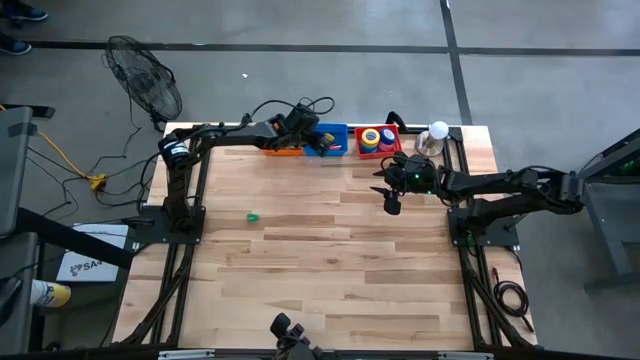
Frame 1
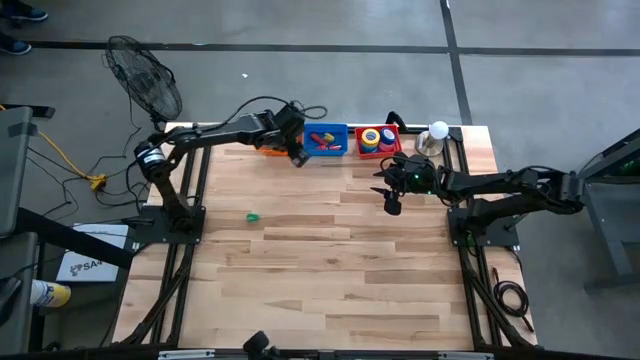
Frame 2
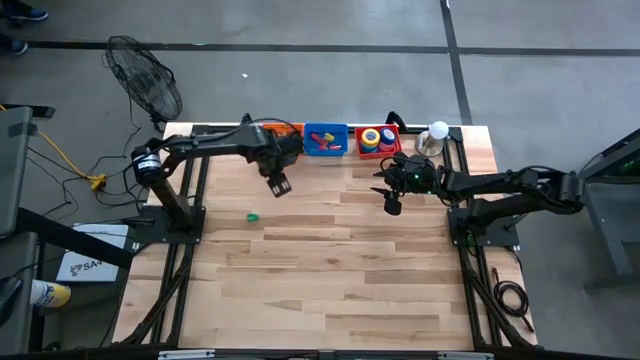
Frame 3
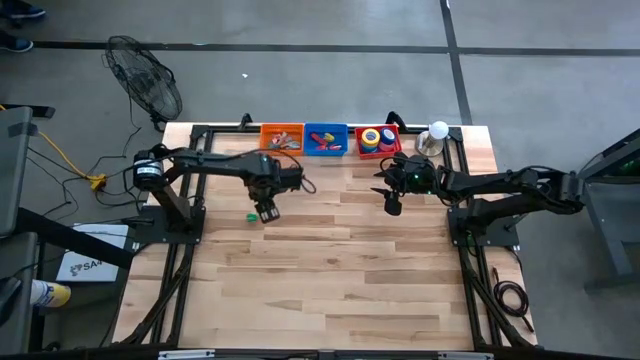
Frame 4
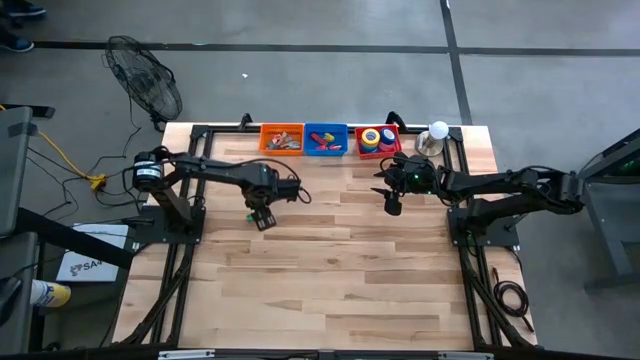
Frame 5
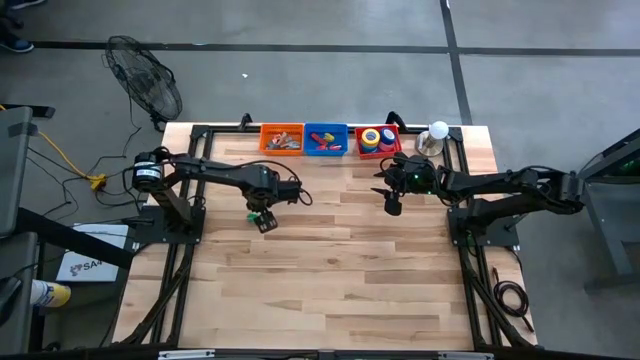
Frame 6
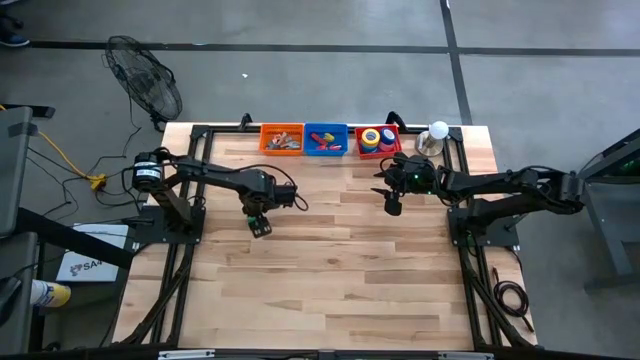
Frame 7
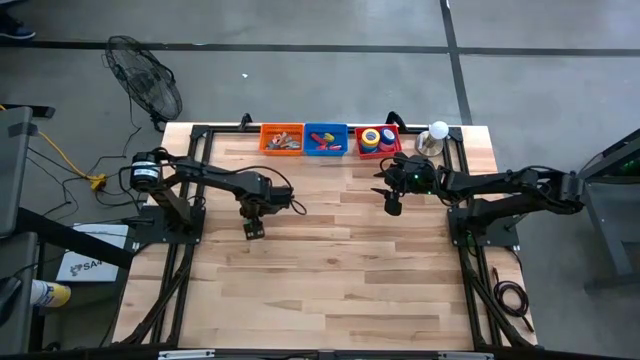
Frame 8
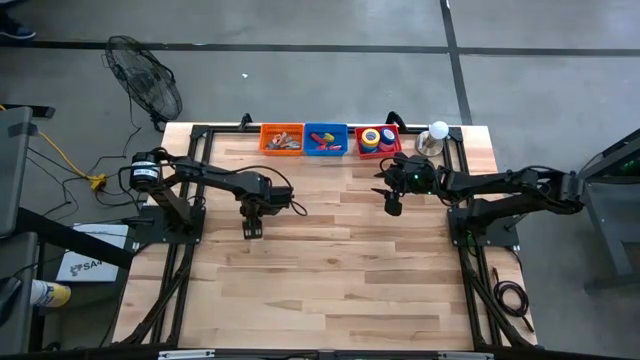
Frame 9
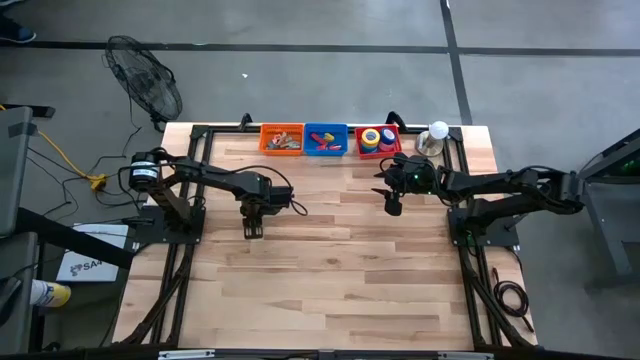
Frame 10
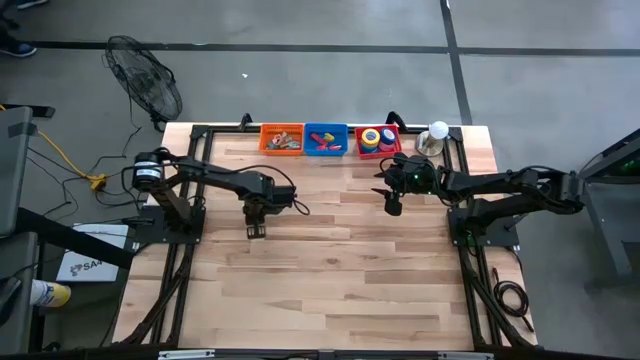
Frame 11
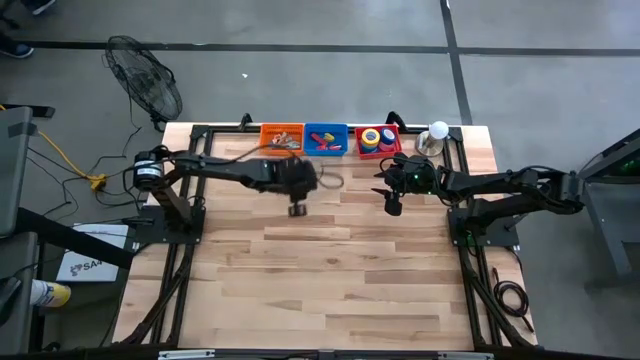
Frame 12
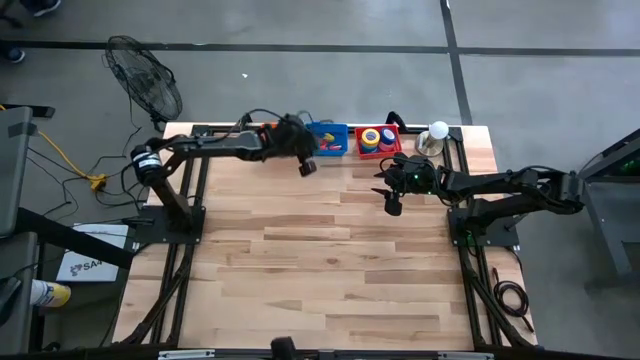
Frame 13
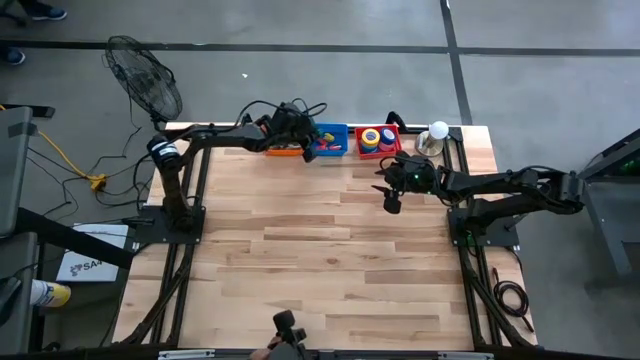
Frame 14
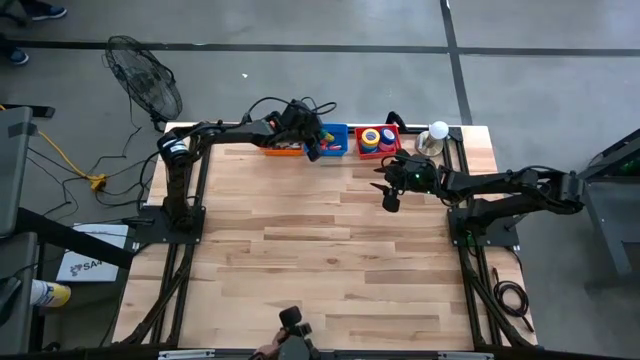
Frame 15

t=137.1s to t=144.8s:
Task: Pick and place Stapler, Stapler remover, tape
Put the green stapler into the blue bin

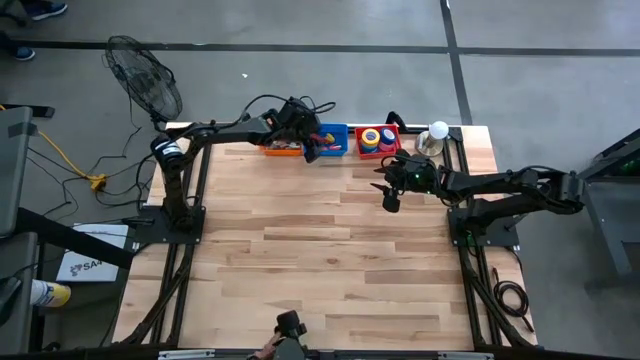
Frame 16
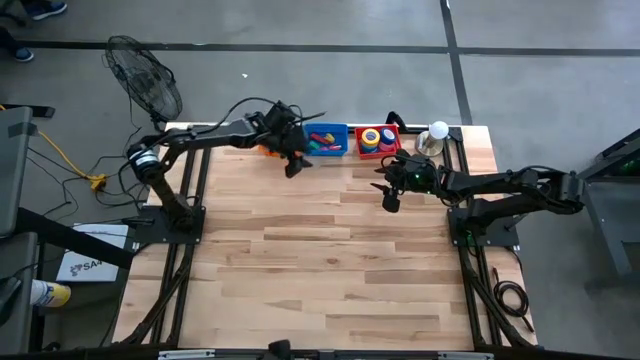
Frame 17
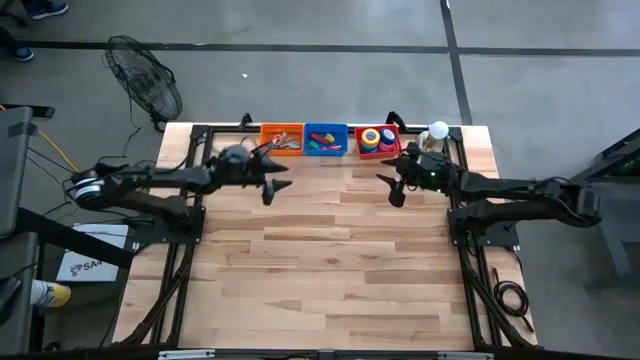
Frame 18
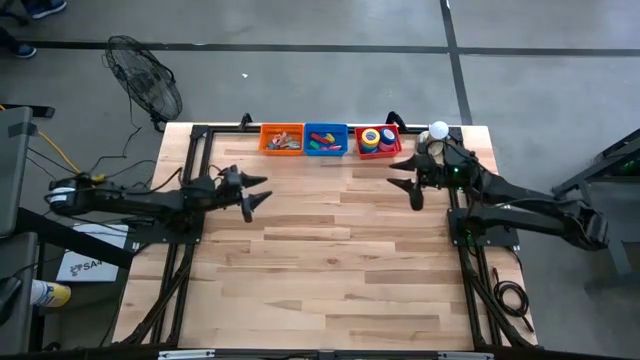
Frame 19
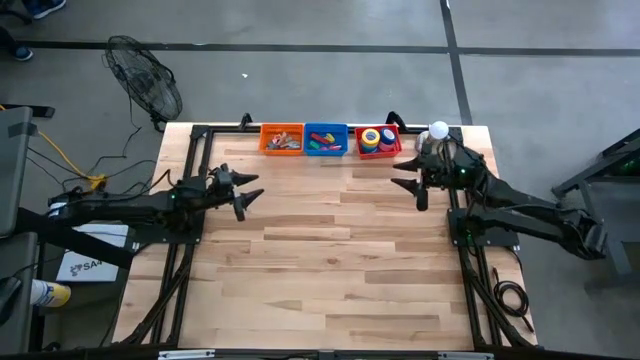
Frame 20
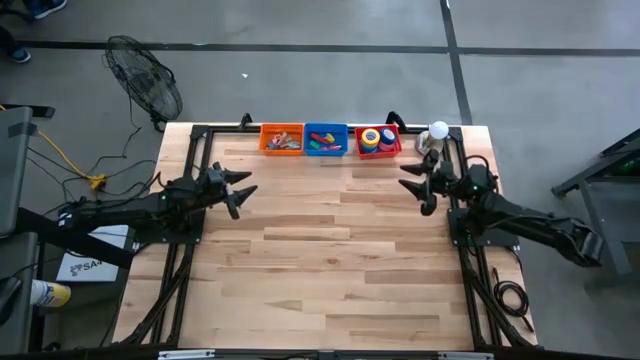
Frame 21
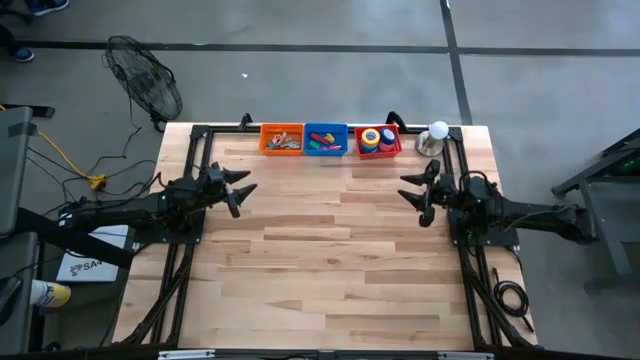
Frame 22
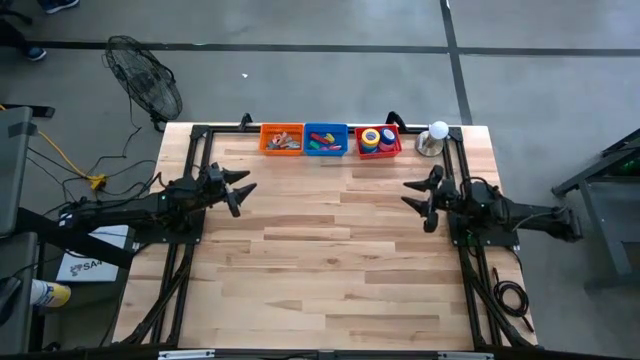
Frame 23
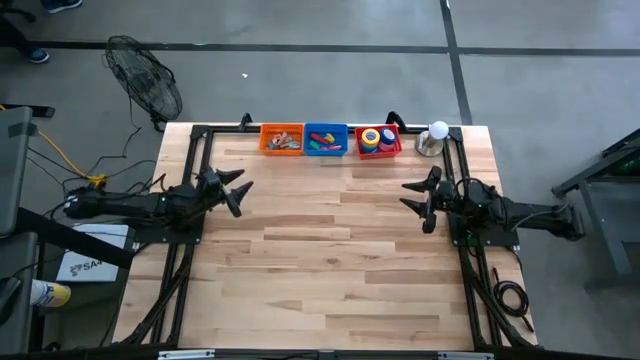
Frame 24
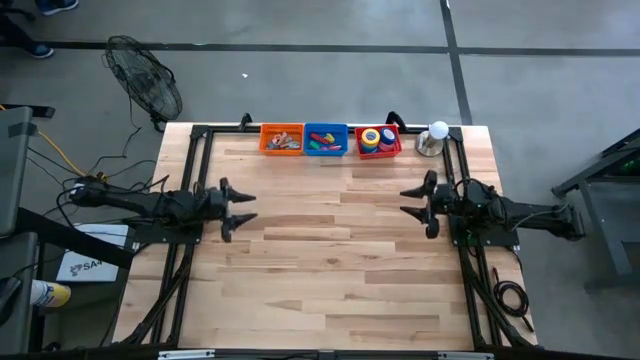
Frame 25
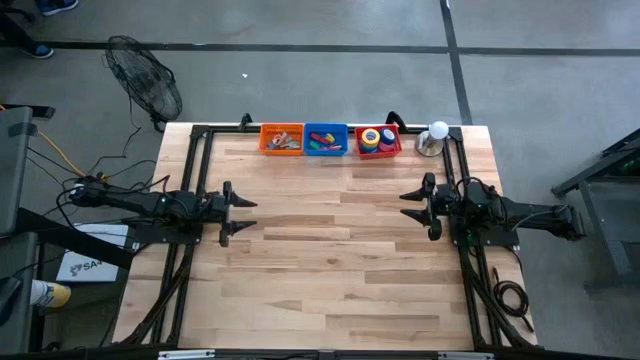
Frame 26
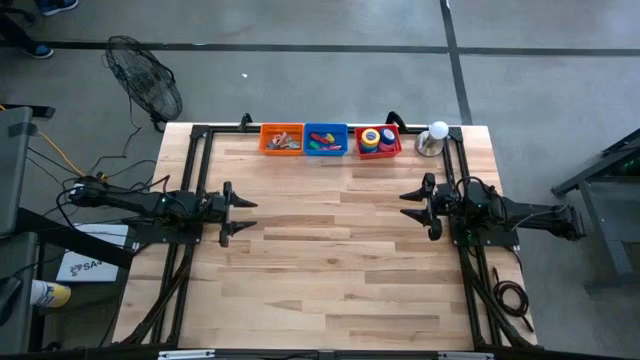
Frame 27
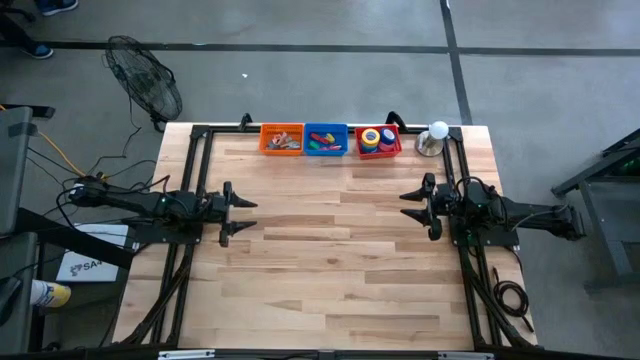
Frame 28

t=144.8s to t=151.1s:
Return to Home Position

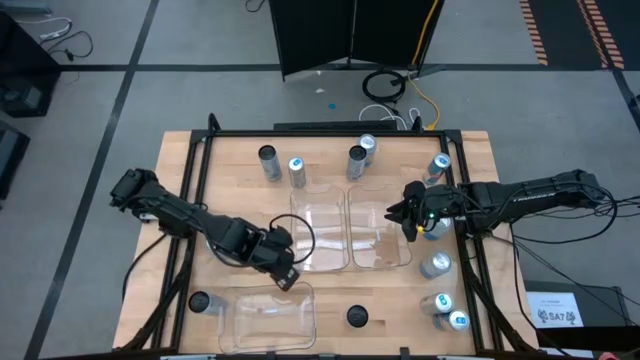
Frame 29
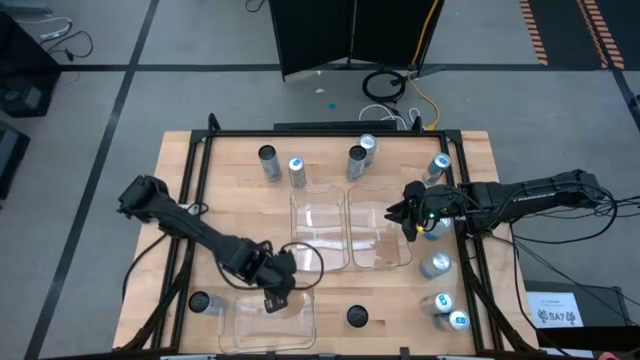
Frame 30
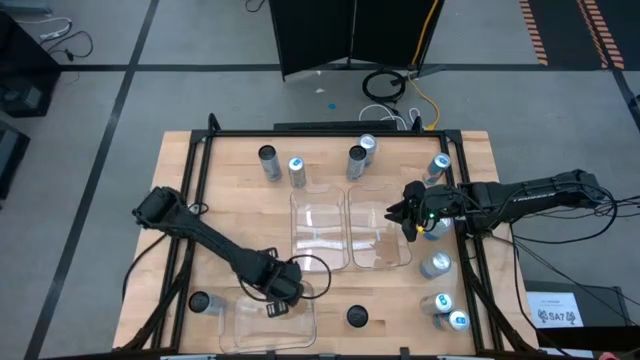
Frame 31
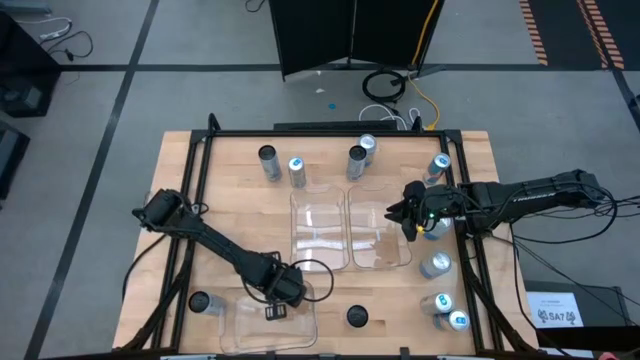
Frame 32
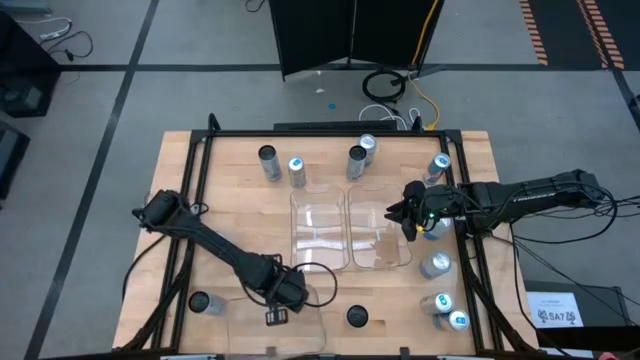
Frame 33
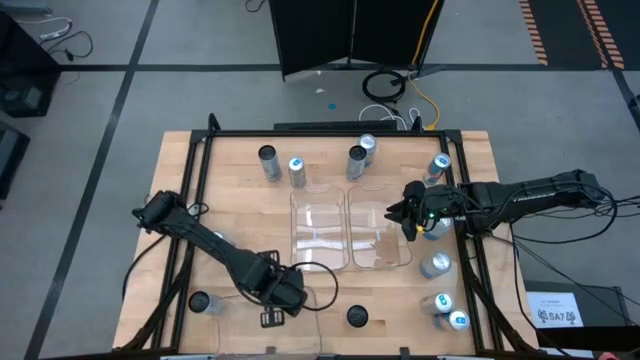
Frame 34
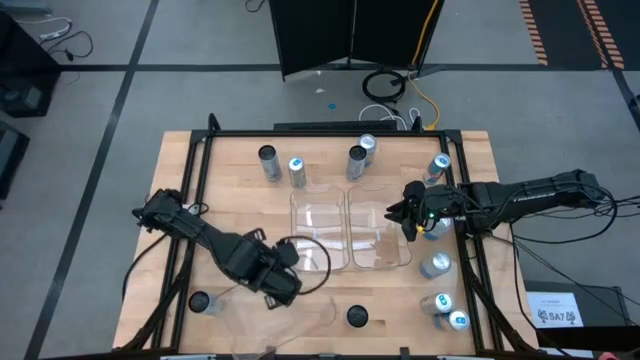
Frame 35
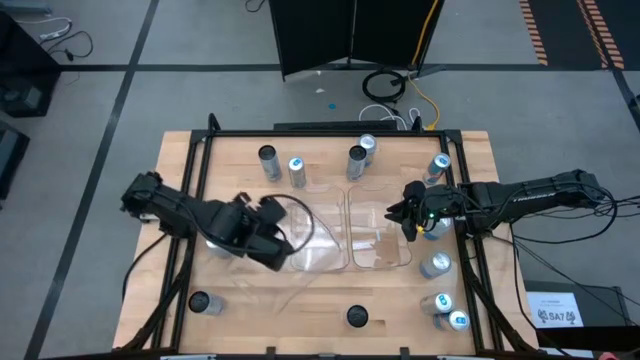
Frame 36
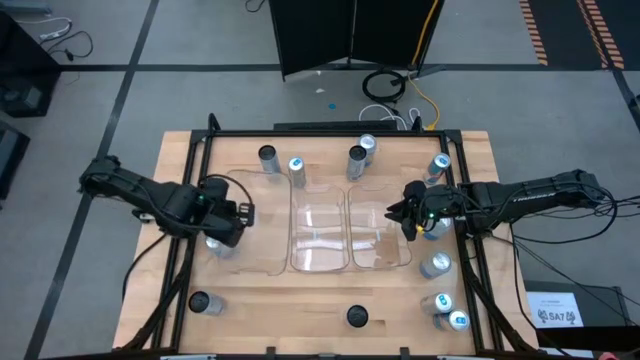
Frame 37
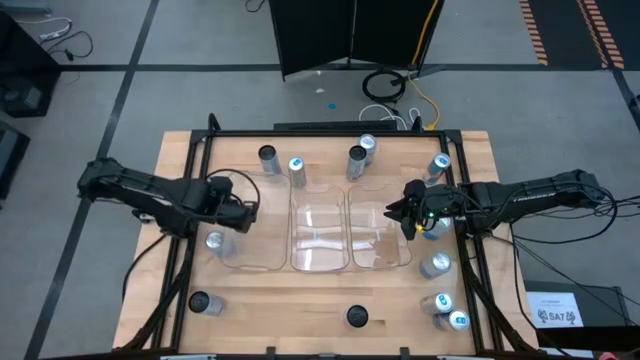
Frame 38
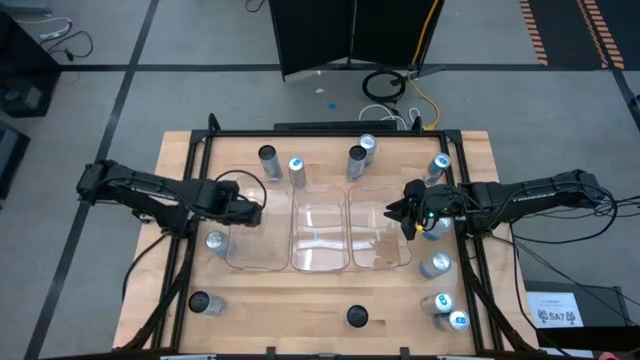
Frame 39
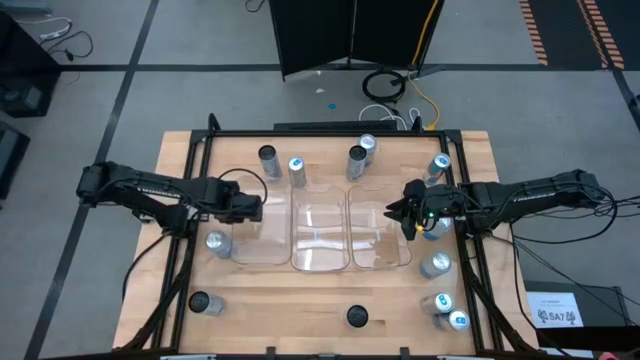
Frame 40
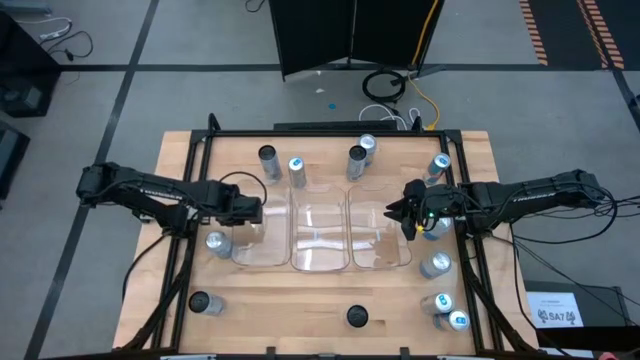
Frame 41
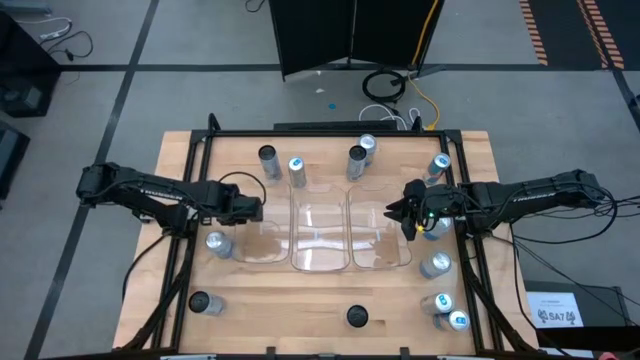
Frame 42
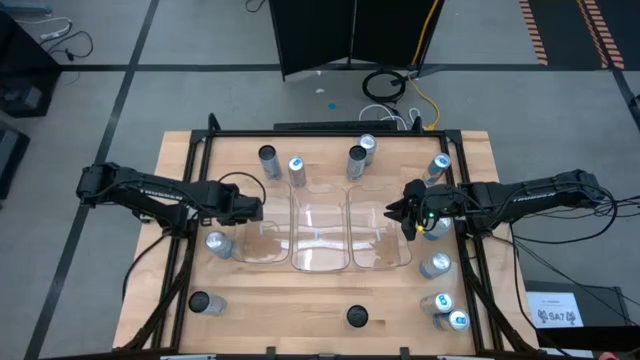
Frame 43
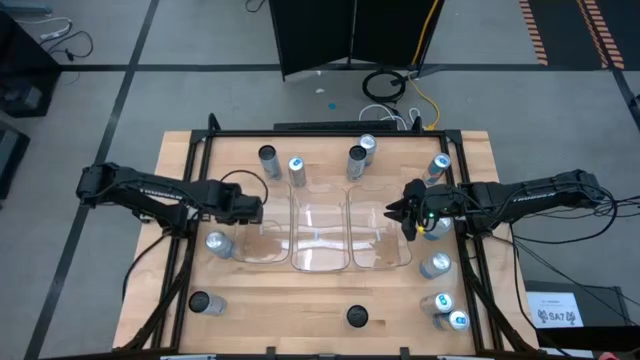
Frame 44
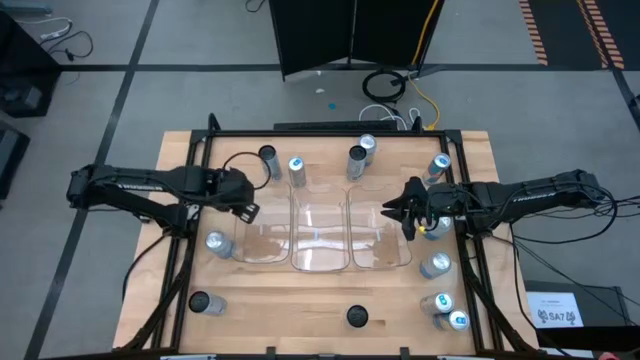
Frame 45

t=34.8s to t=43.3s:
Task: Sort soda cans
Move the bottom left transparent bin to the middle left of the table
